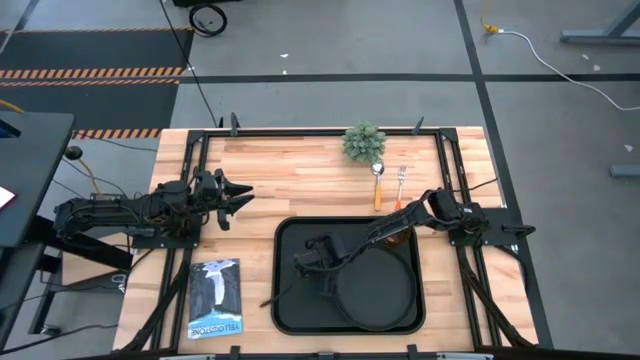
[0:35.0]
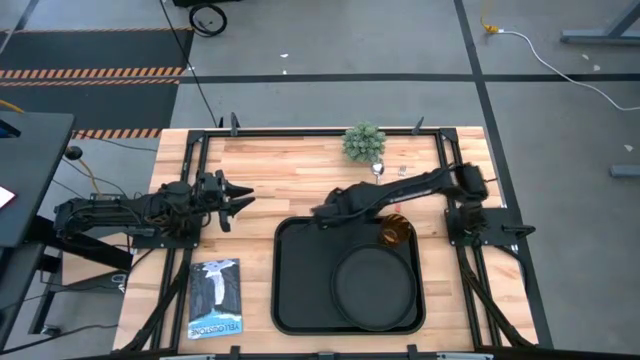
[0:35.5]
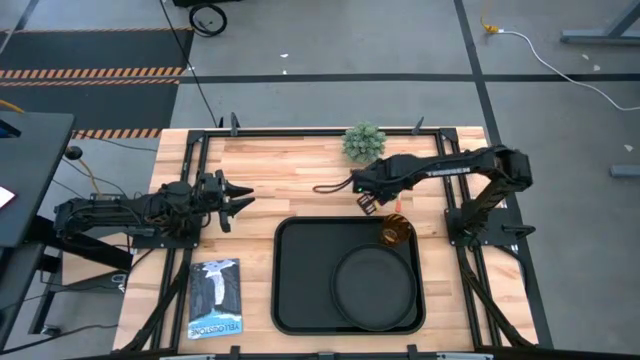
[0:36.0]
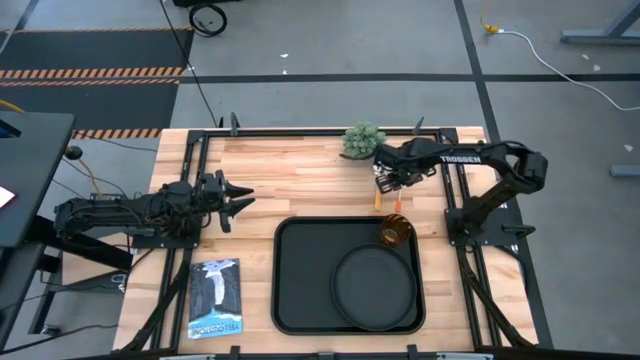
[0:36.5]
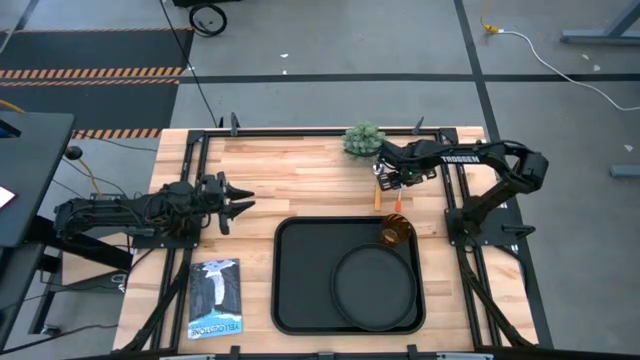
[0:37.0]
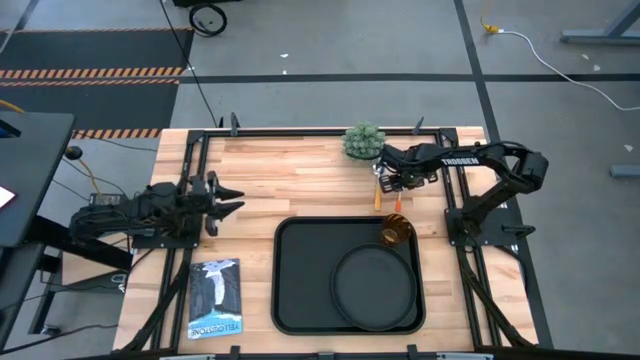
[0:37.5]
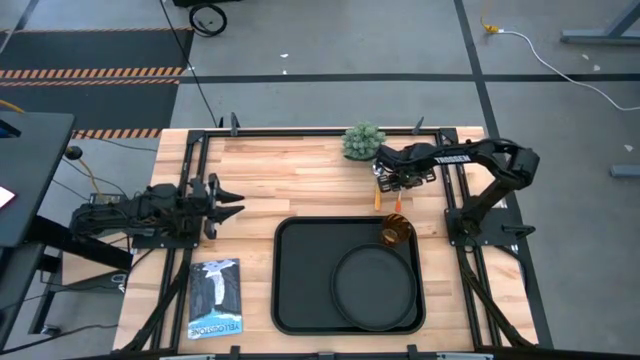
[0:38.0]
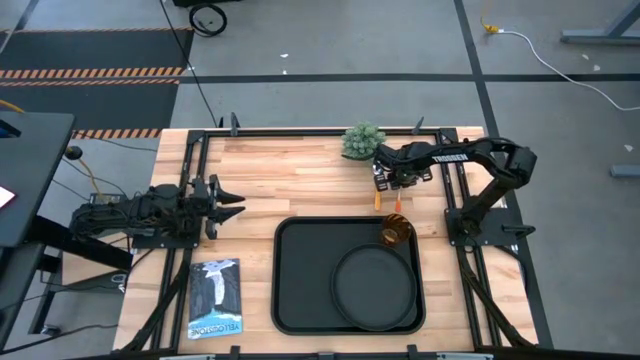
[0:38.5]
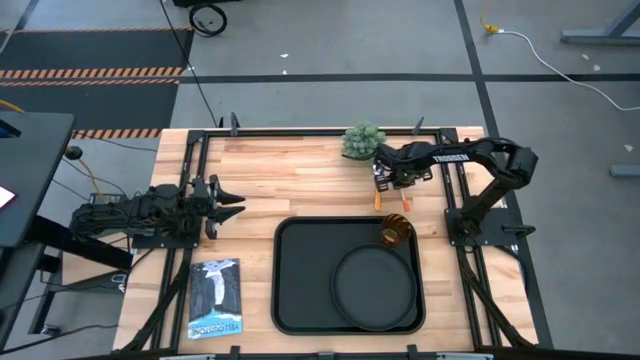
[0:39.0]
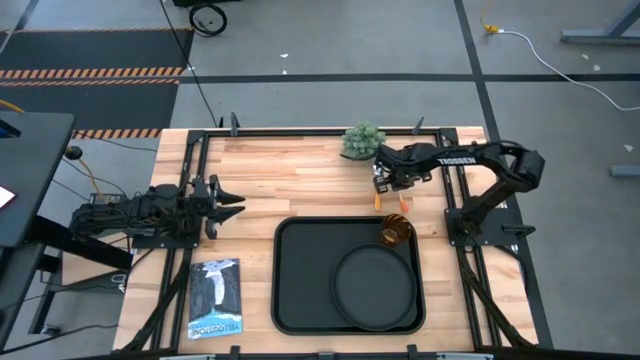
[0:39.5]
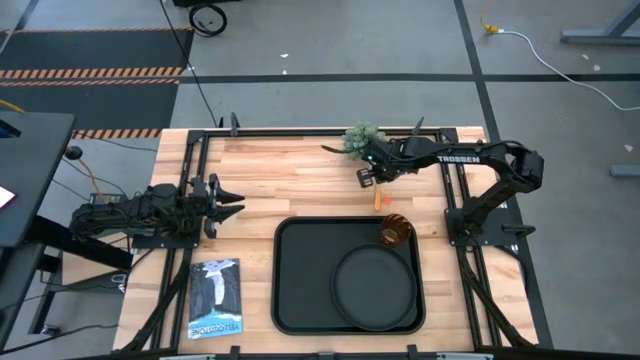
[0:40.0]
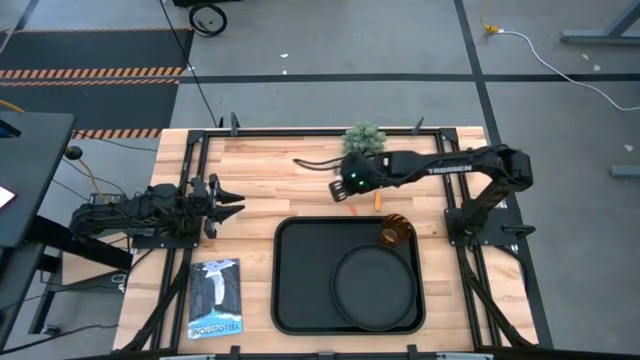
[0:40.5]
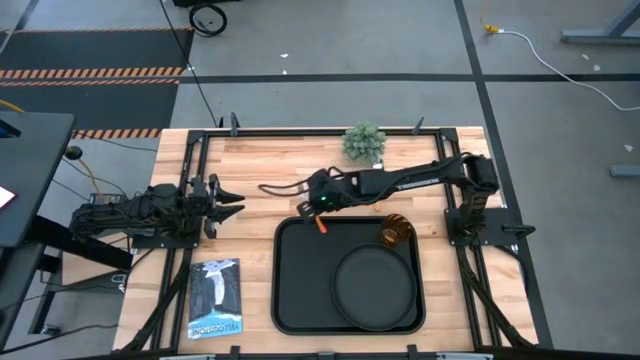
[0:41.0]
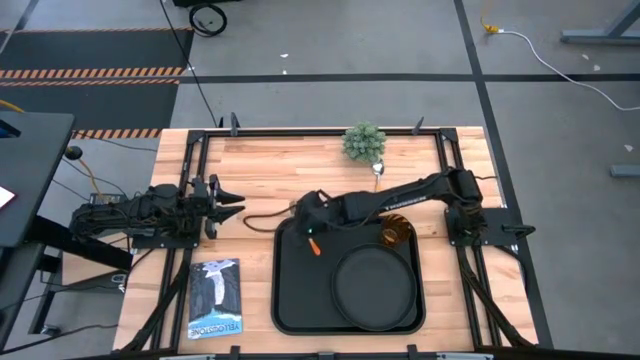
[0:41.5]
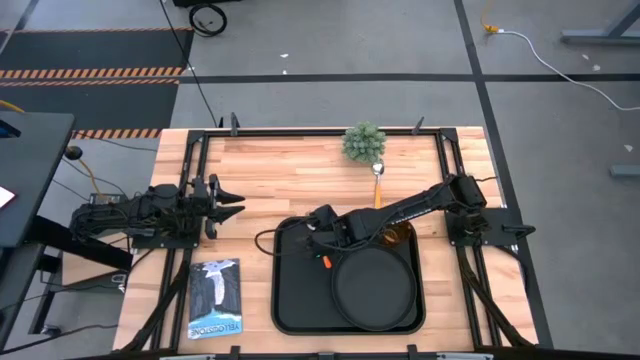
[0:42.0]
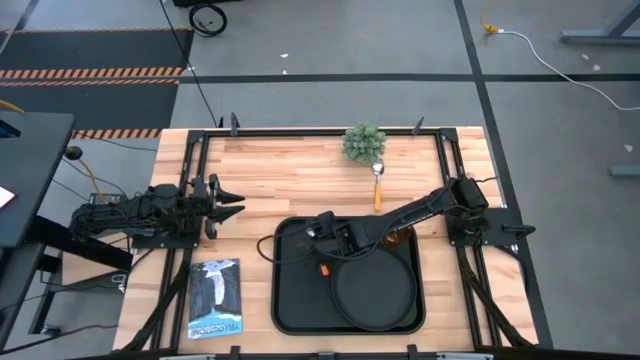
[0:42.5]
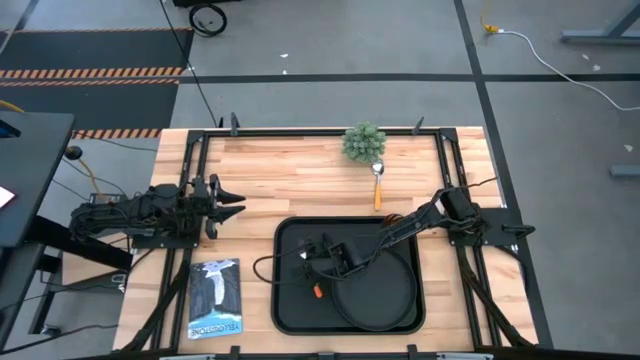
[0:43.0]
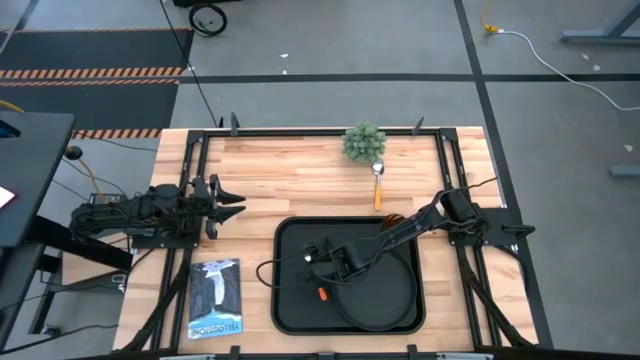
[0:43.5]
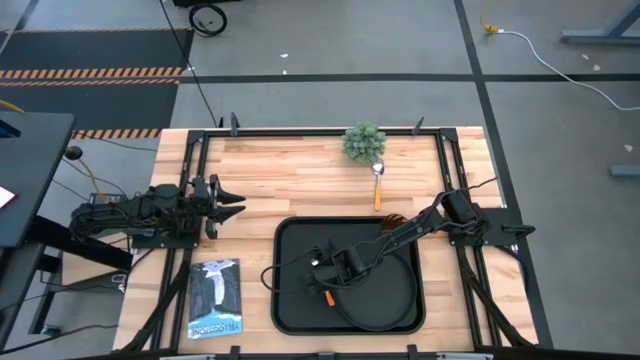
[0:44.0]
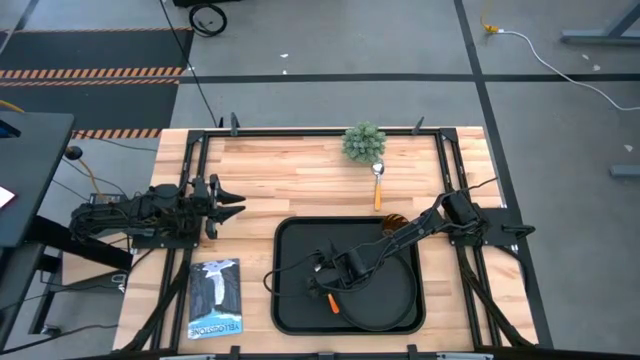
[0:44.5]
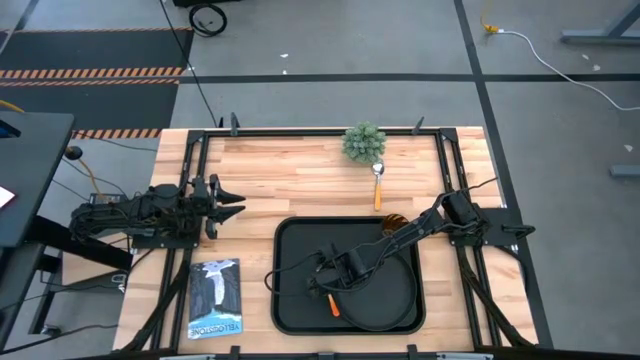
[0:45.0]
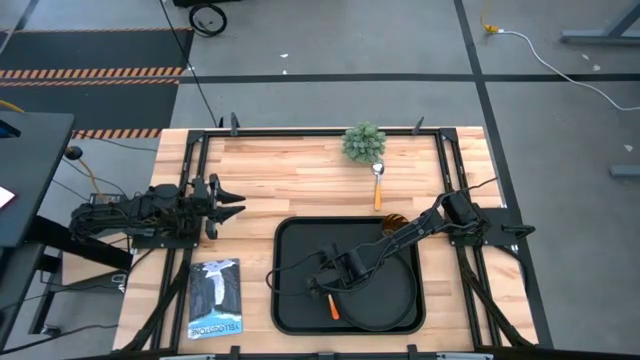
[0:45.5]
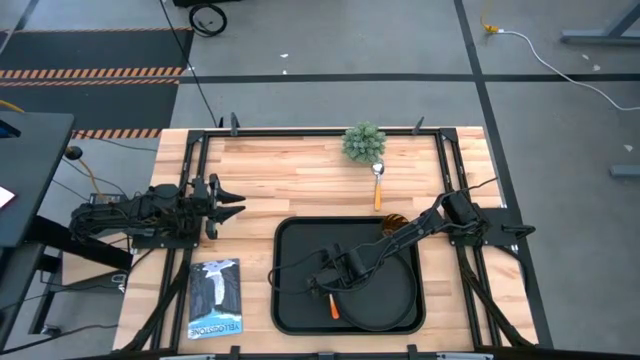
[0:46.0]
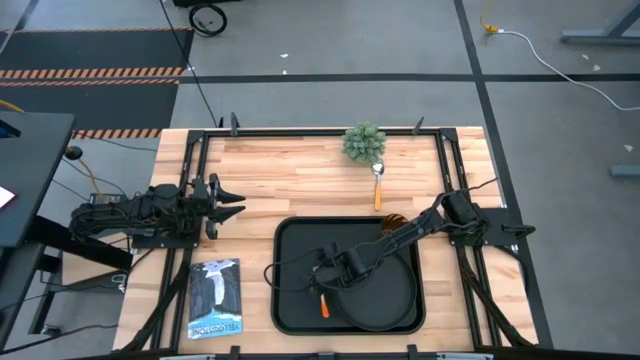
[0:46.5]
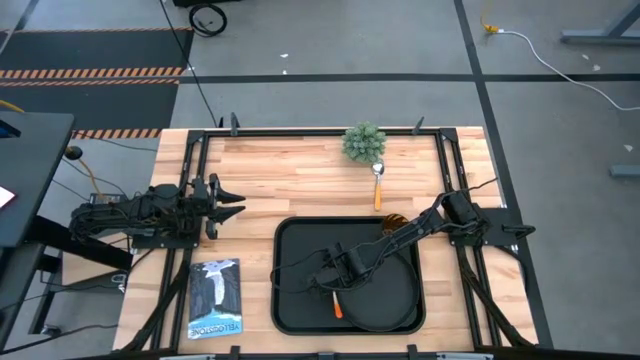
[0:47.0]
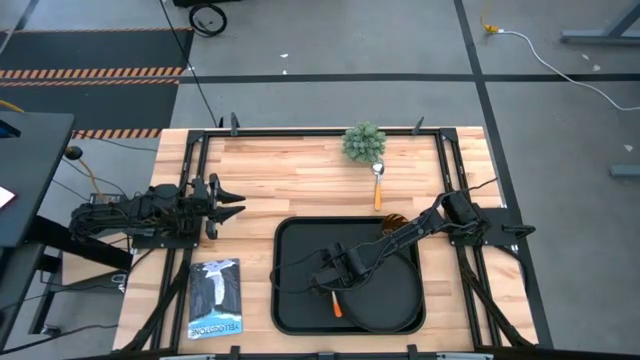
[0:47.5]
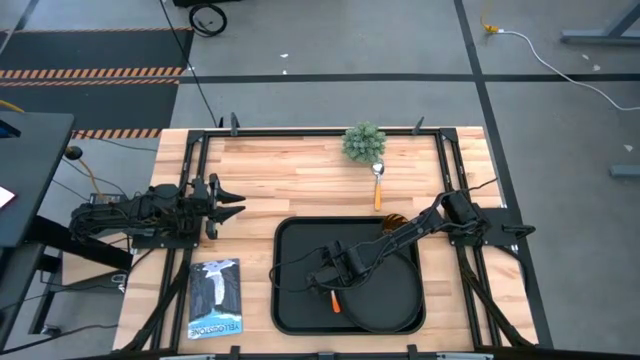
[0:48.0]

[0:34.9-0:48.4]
Task: Pick and place plate/cup/fork/spoon on tray
Put the orange fork on the black tray to the left of the black plate

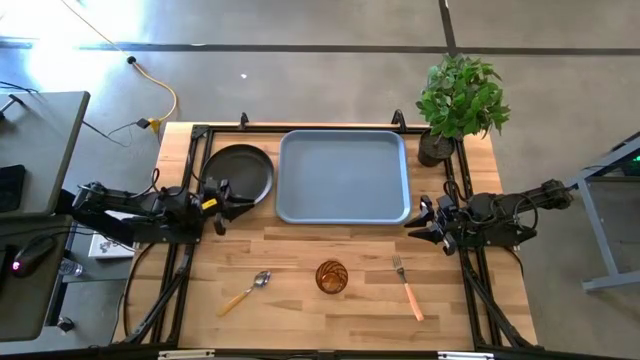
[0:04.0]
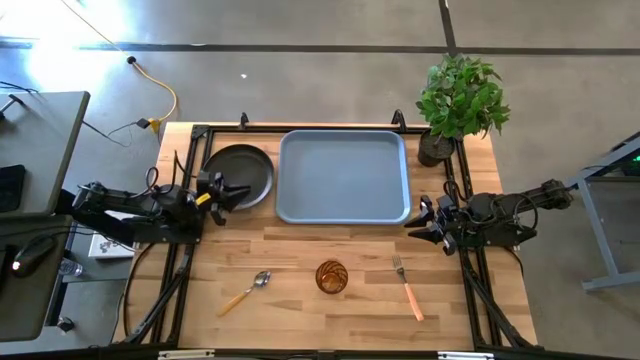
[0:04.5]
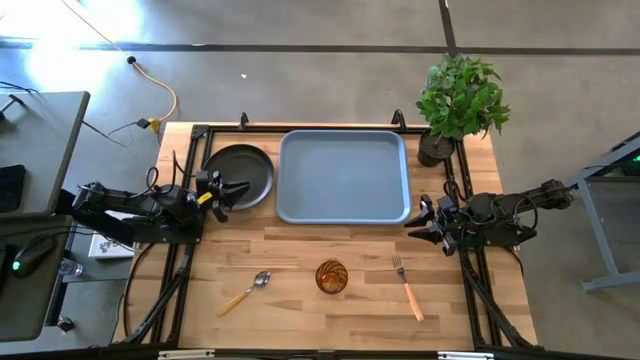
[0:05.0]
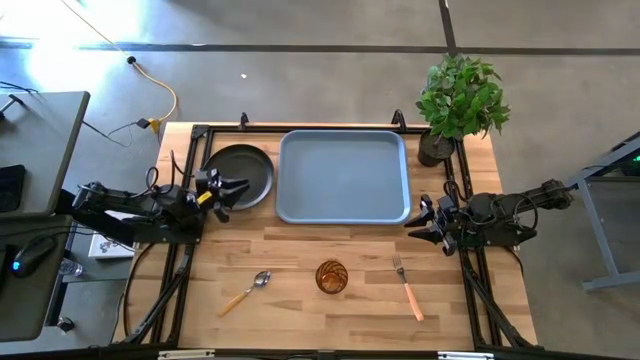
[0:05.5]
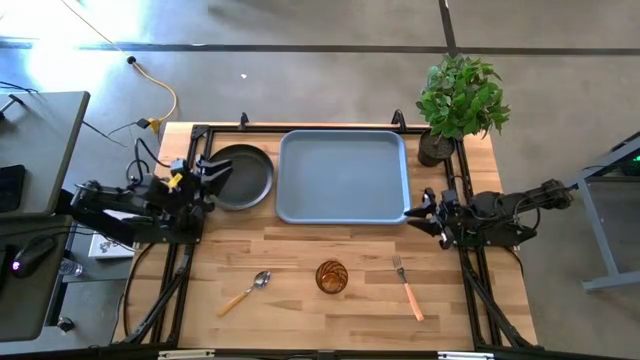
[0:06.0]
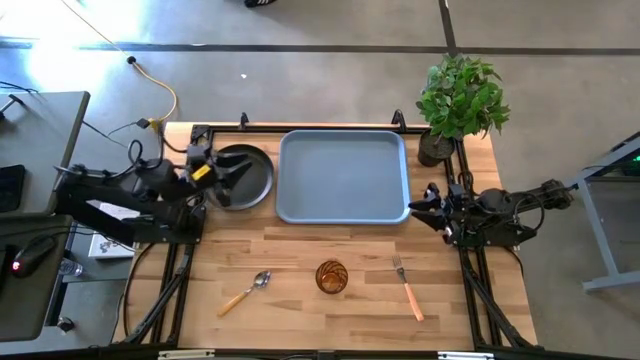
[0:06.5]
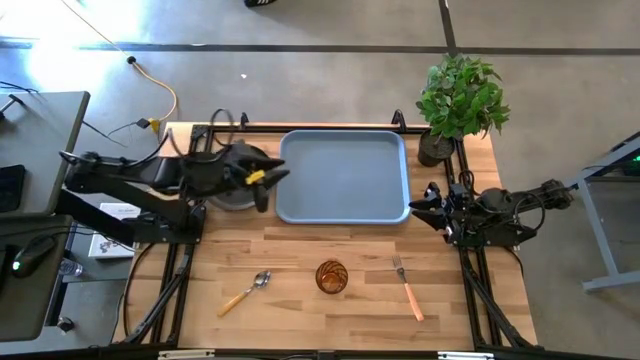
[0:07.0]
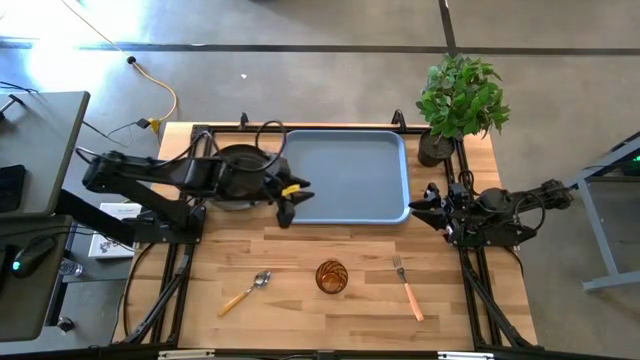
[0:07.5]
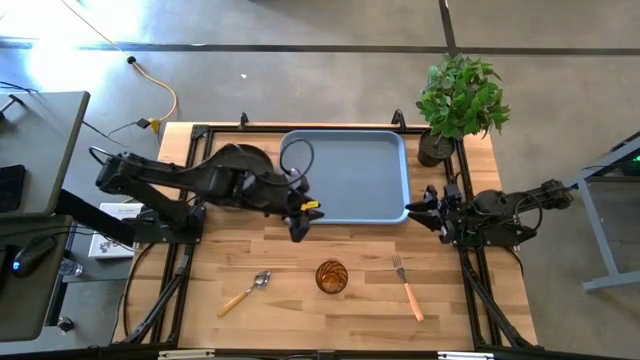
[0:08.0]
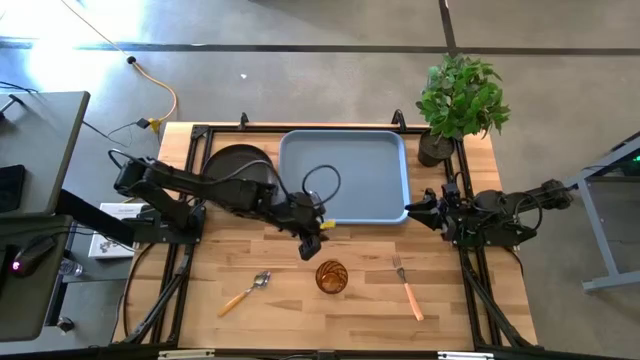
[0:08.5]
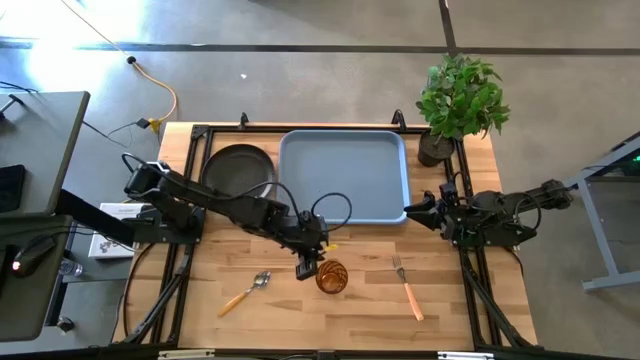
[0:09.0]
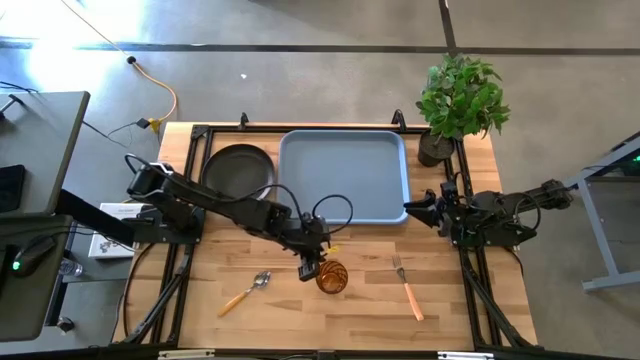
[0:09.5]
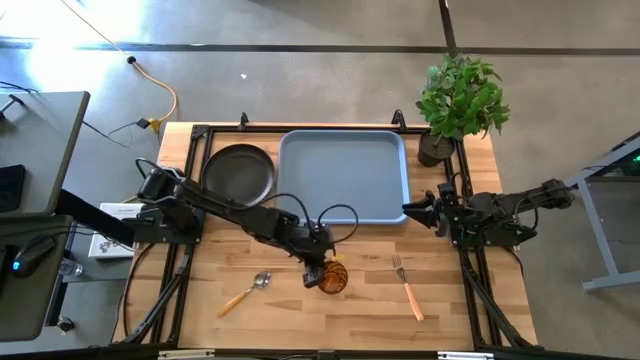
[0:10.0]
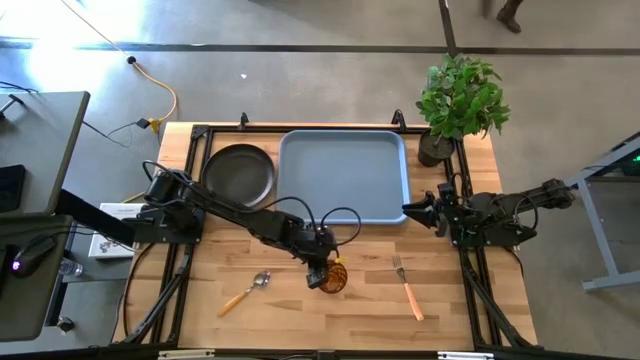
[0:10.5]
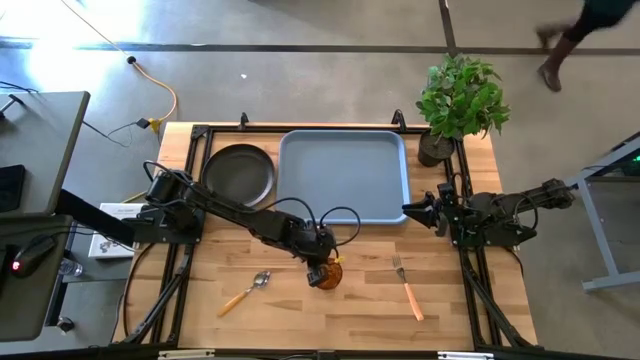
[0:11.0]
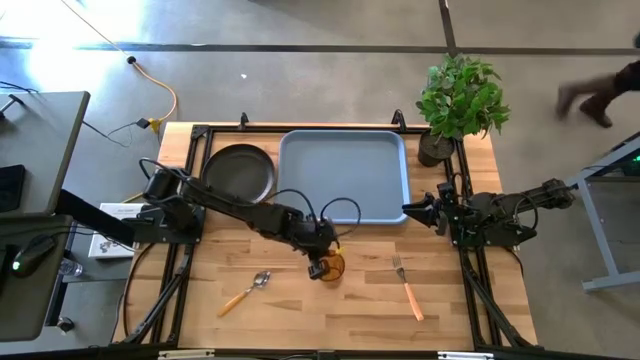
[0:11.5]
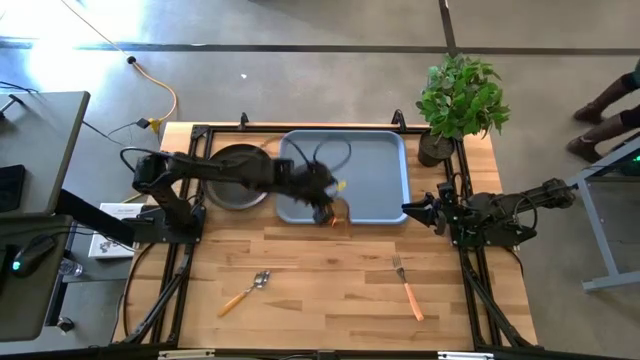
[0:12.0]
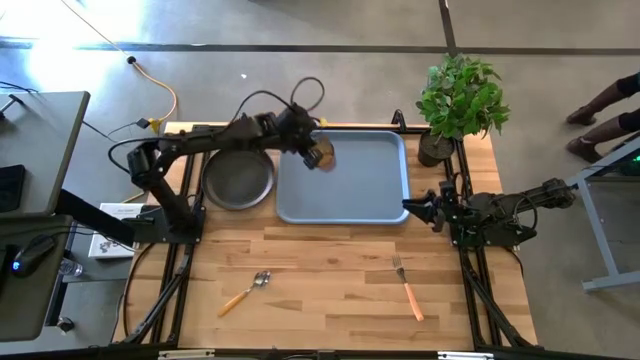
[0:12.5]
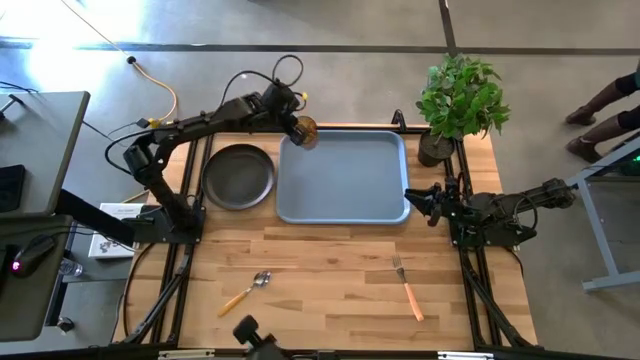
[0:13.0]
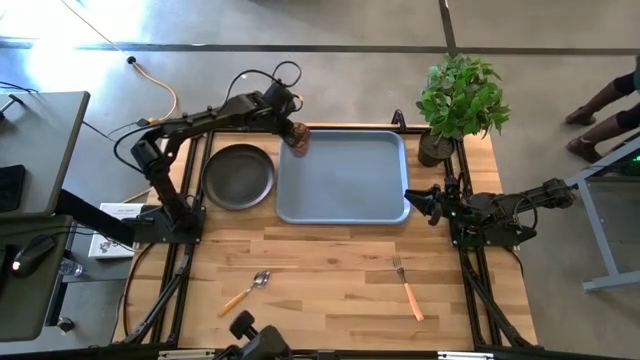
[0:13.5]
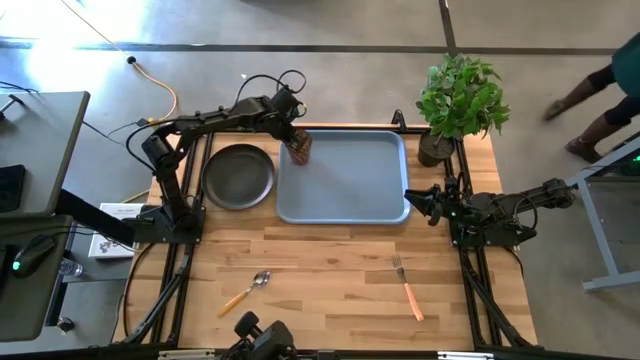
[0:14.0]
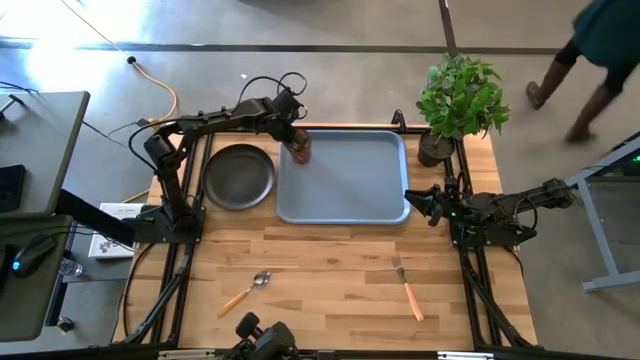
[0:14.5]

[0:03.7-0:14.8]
Task: Pick and place plate/cup/fork/spoon on tray
Put the brown glass on the gray serving tray
